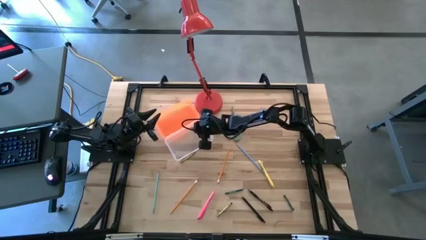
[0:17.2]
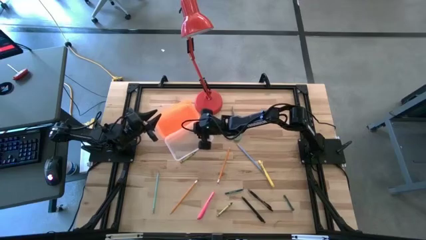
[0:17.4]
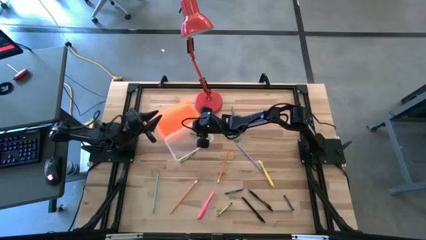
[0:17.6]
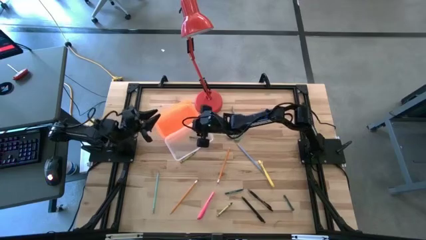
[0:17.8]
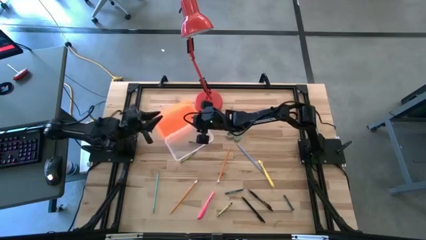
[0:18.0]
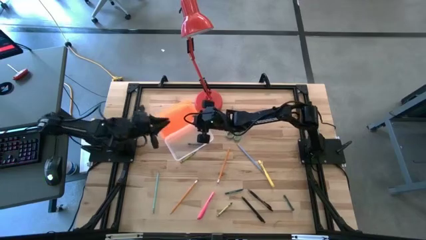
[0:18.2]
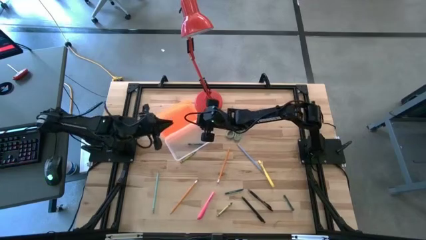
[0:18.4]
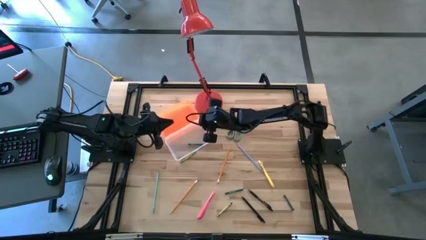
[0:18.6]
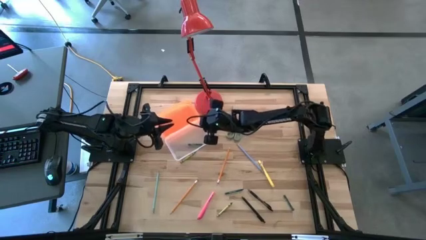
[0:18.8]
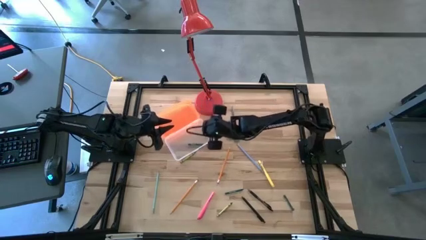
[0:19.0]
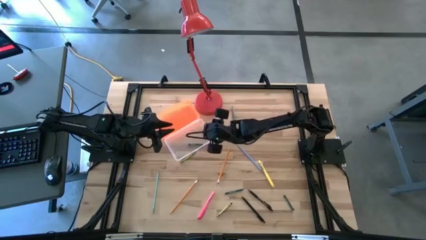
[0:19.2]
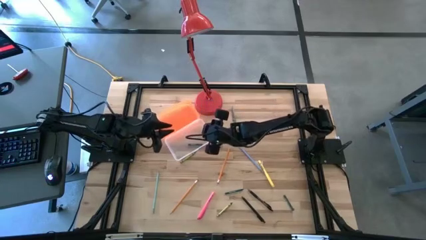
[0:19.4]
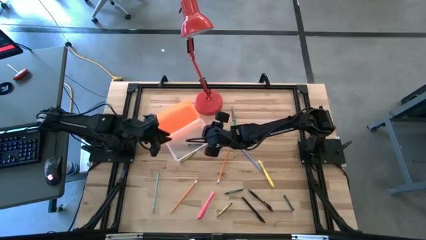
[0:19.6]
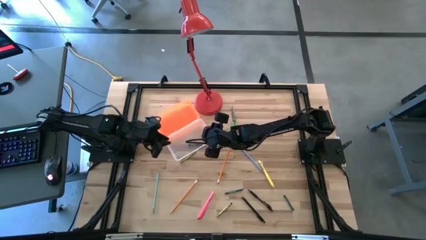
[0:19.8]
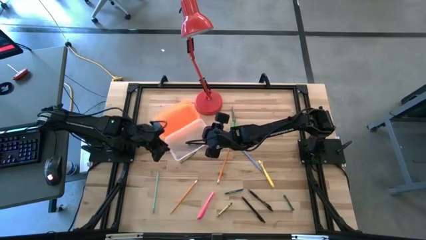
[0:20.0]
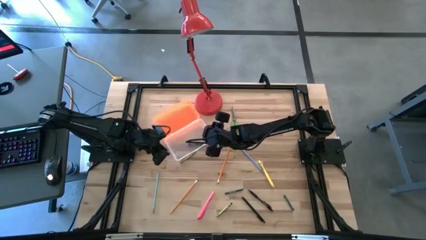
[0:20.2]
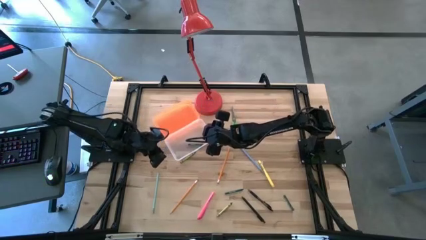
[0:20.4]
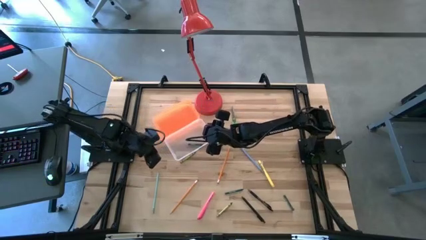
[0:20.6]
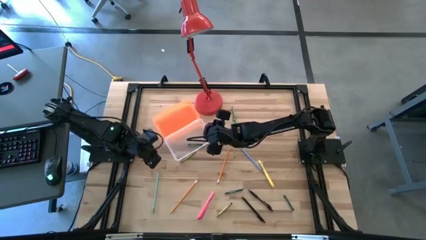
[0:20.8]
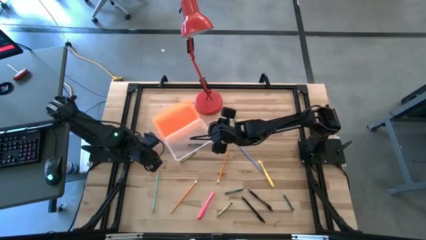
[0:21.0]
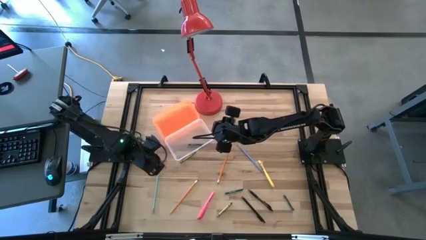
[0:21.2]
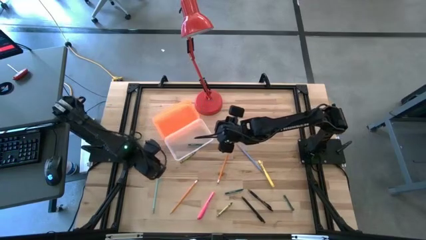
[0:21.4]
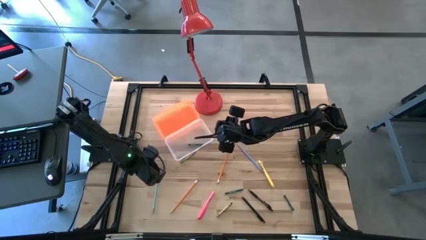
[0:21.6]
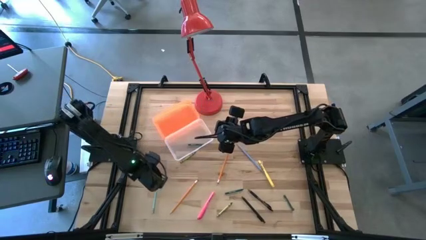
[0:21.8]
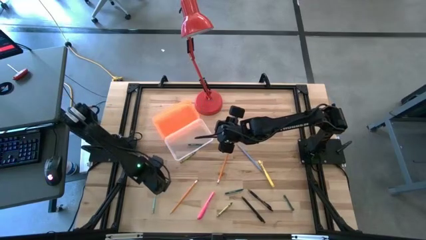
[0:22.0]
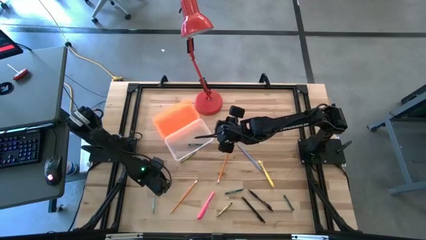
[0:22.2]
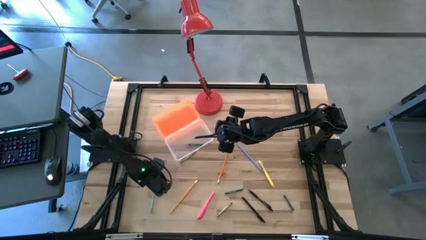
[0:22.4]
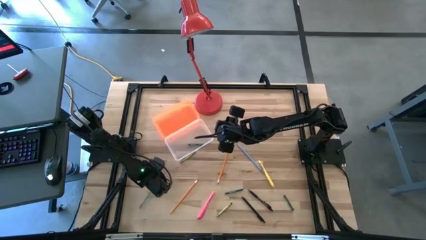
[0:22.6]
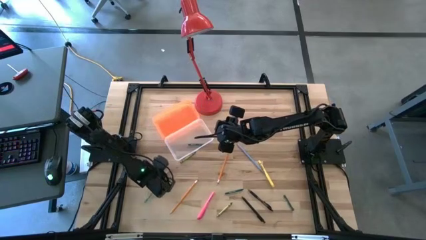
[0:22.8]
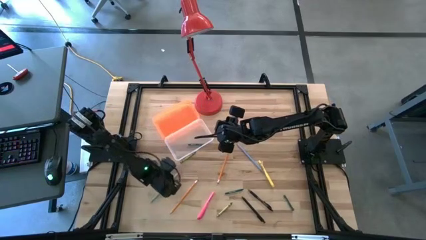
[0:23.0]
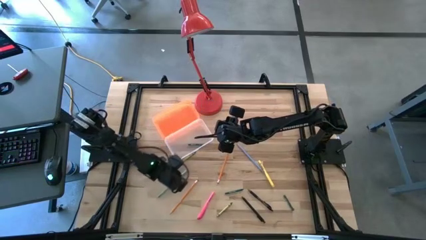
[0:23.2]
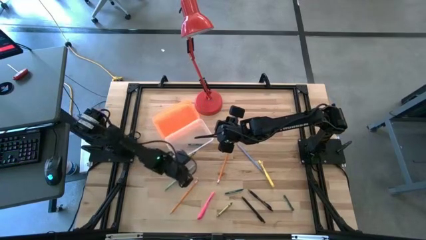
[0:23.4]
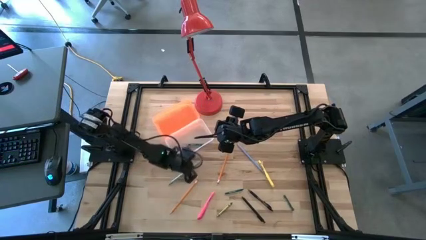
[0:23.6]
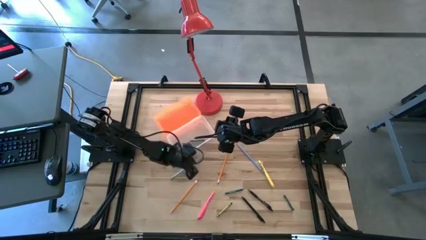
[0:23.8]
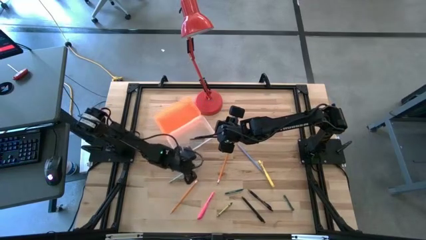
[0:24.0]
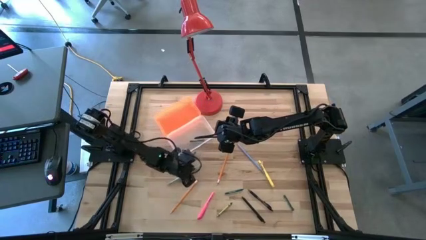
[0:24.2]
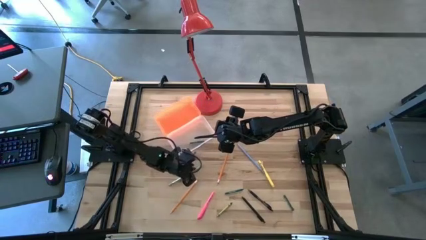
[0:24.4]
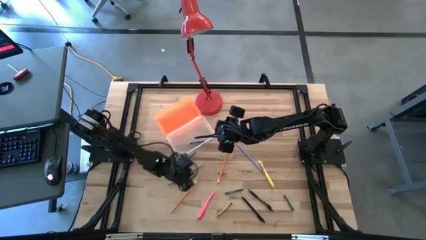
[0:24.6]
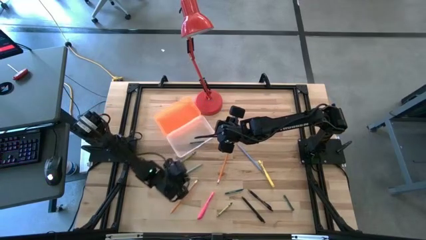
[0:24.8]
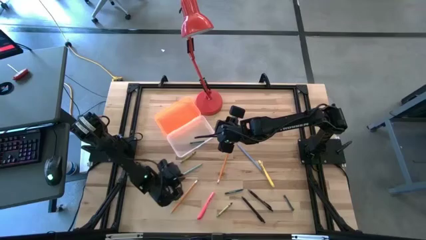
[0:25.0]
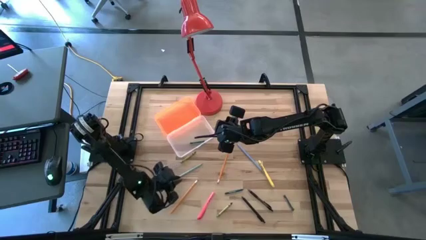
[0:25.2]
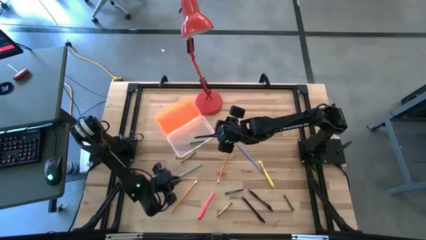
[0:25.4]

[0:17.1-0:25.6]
Task: Pick & place school supplies into a supply box
Put the blue pencil into the orange supply box

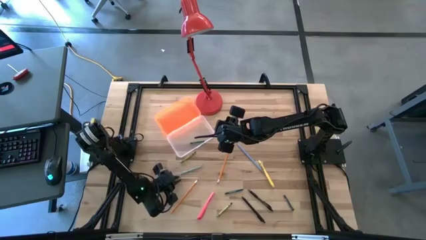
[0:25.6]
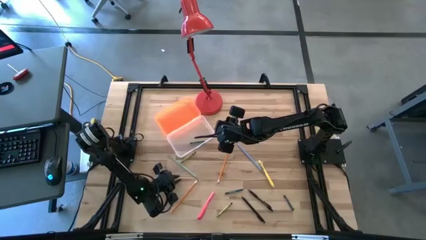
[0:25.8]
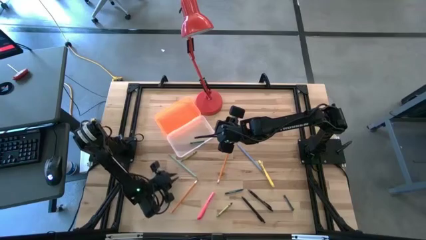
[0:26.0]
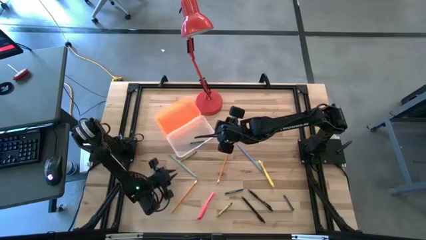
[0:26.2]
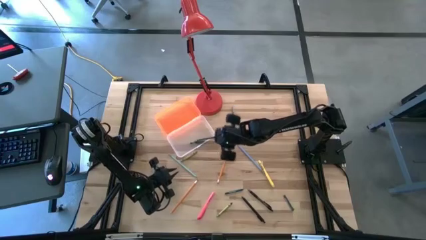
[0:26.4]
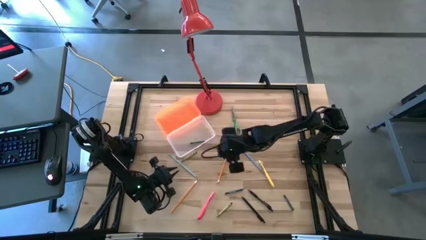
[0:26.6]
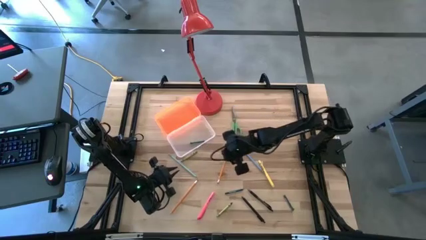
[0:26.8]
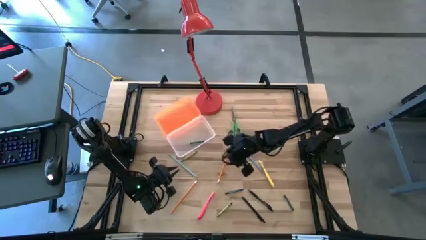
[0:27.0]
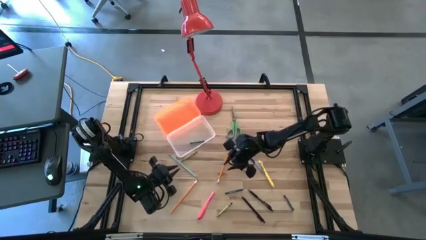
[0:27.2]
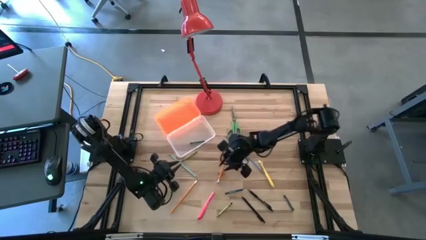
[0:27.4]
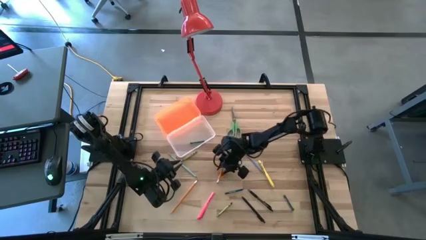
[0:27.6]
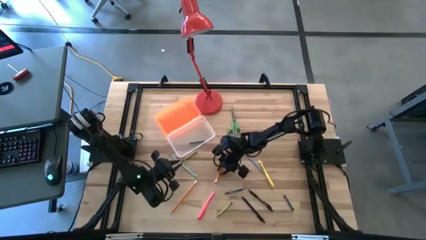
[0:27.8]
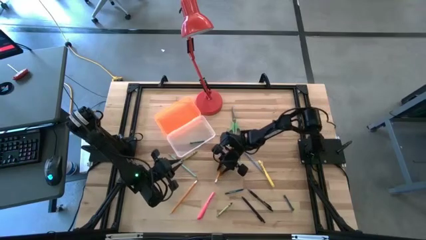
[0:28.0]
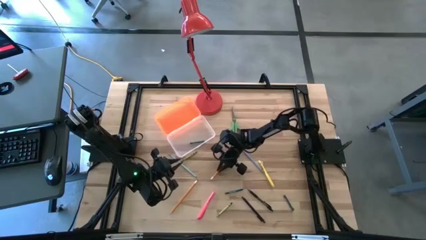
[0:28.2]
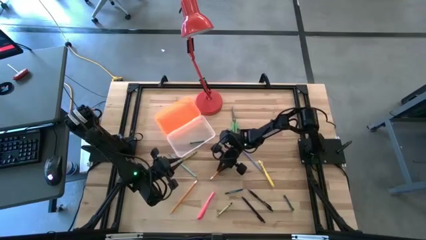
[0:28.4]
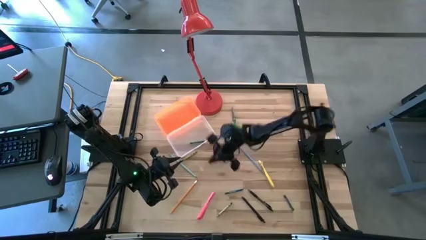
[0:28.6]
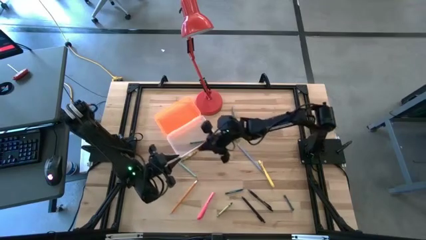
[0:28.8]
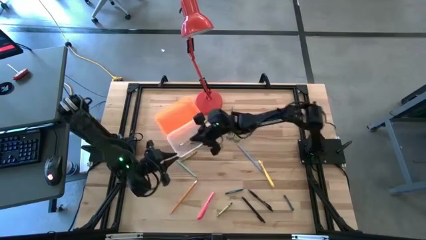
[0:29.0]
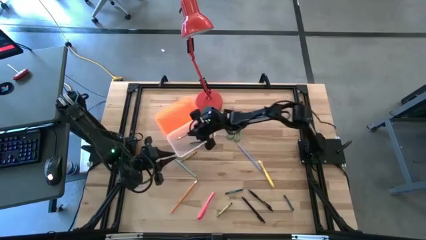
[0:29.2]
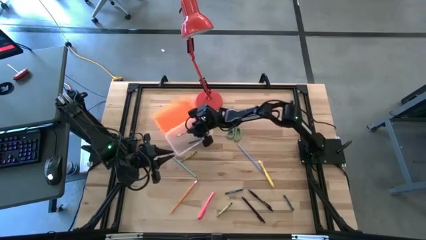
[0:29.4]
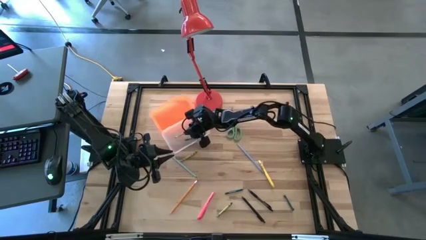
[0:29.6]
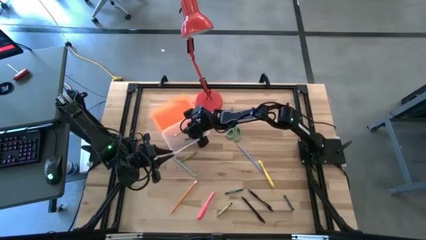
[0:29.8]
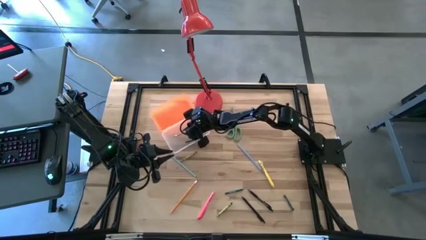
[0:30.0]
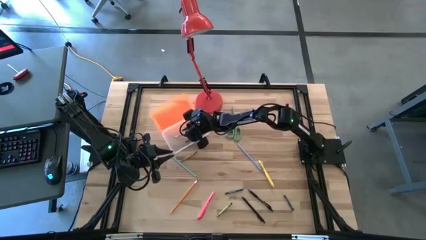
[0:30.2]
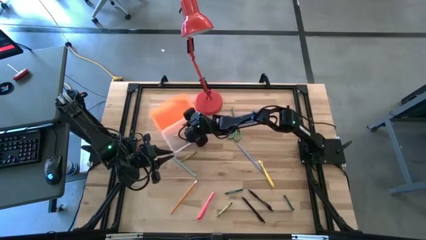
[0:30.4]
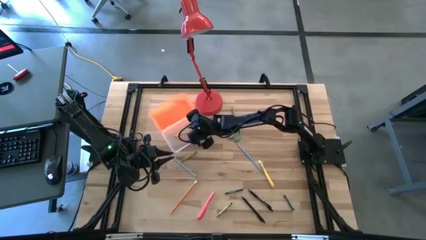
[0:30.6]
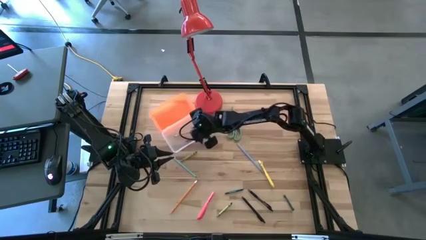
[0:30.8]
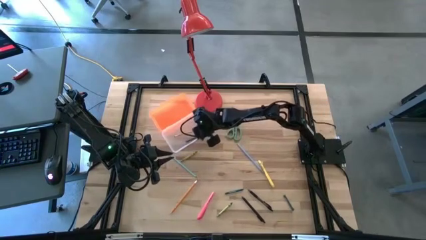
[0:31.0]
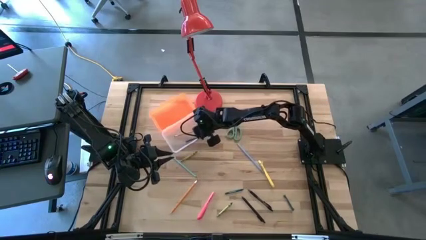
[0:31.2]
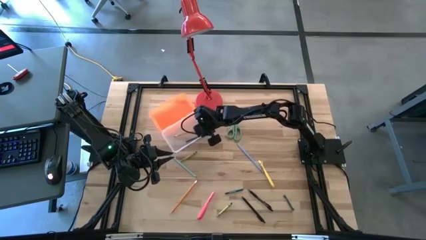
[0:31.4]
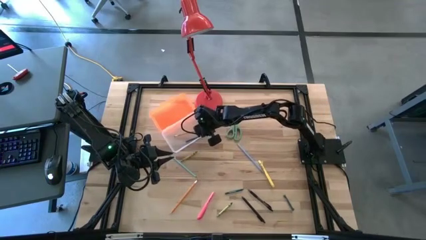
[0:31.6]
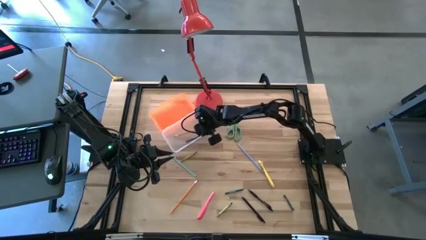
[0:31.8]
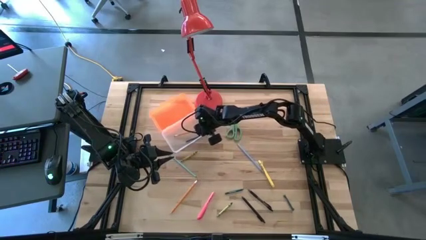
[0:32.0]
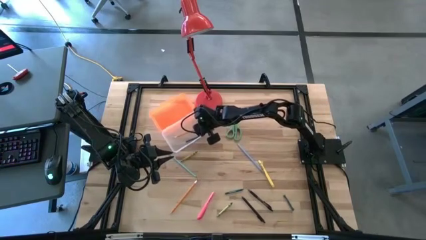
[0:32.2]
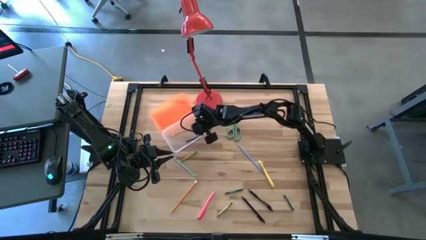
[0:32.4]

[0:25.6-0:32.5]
Put the top orange pencil into the orange supply box
